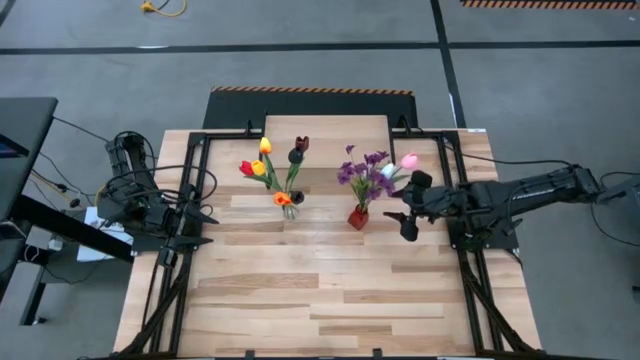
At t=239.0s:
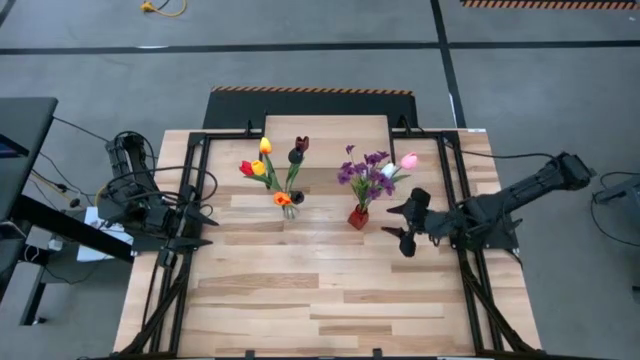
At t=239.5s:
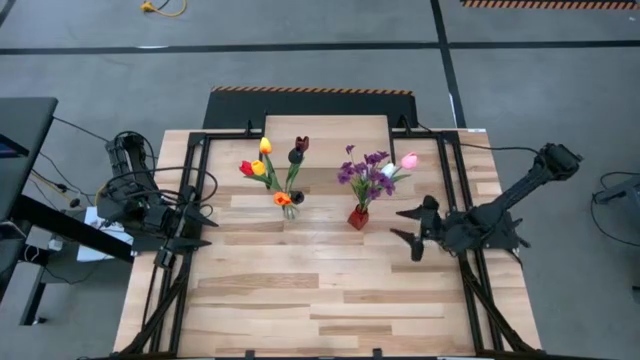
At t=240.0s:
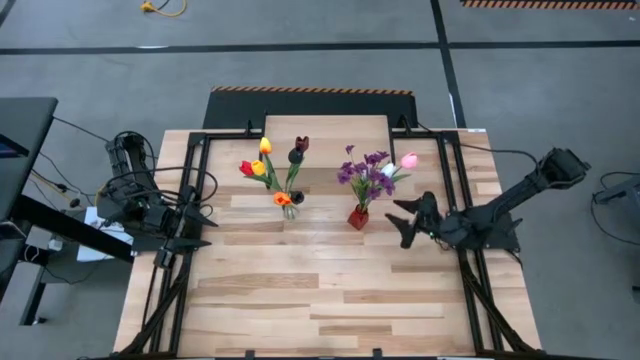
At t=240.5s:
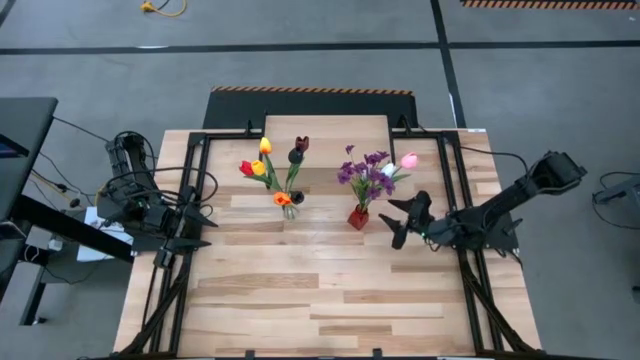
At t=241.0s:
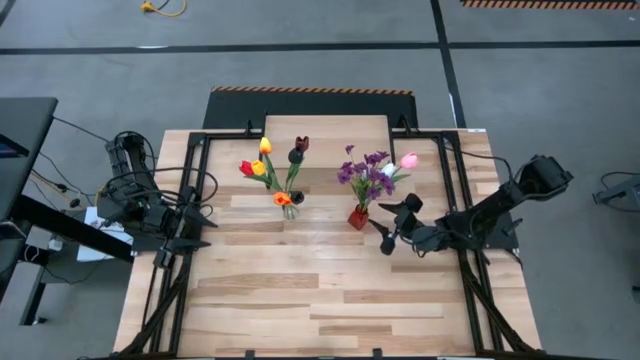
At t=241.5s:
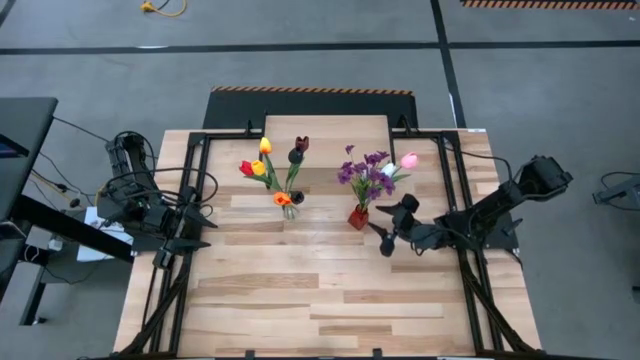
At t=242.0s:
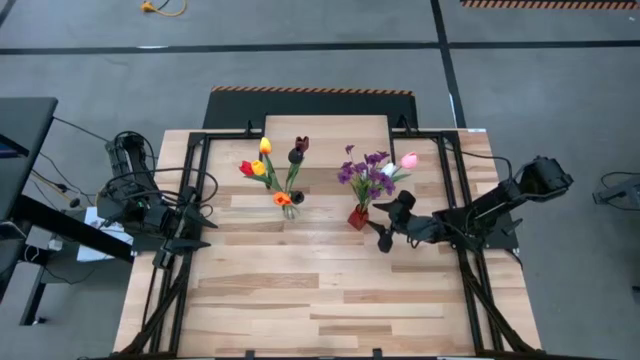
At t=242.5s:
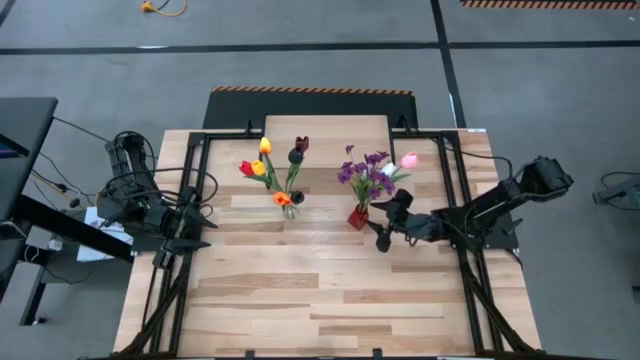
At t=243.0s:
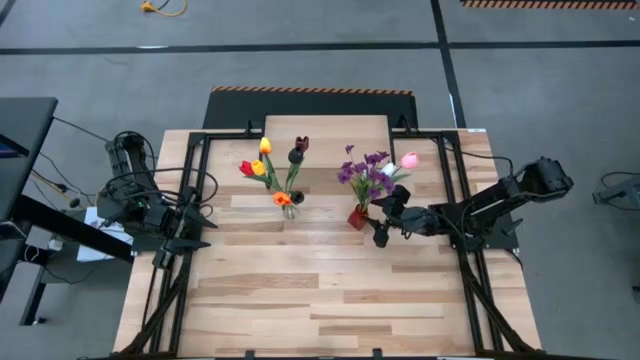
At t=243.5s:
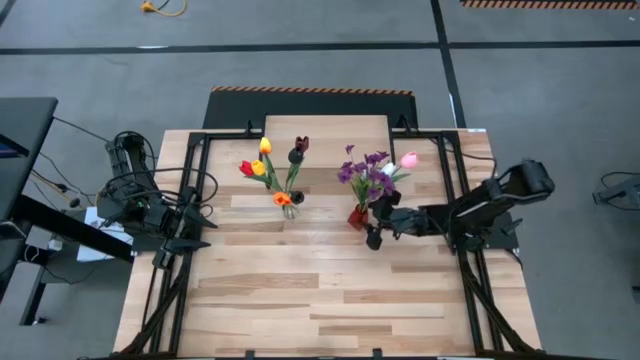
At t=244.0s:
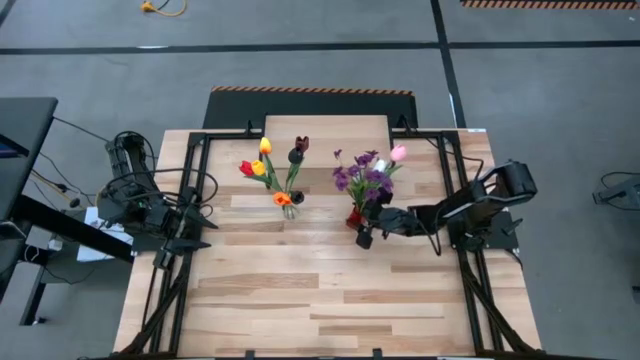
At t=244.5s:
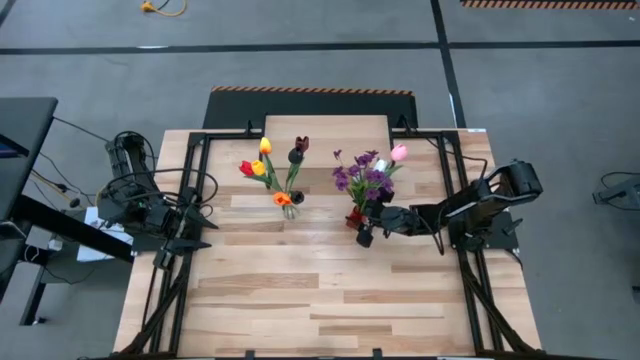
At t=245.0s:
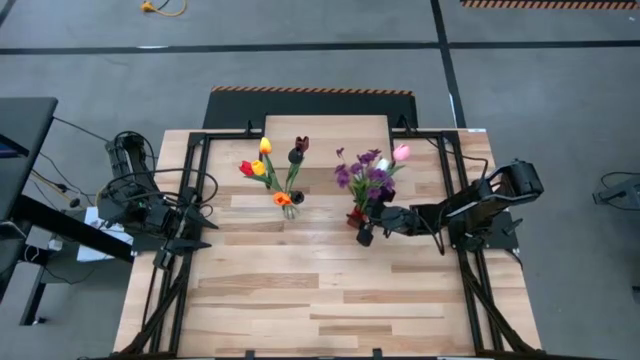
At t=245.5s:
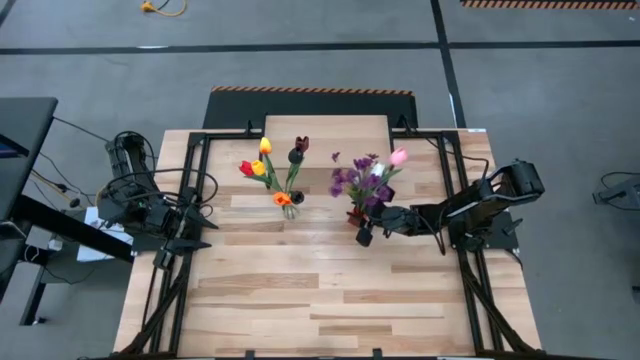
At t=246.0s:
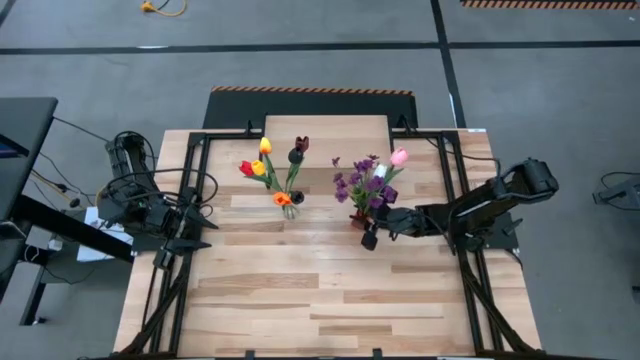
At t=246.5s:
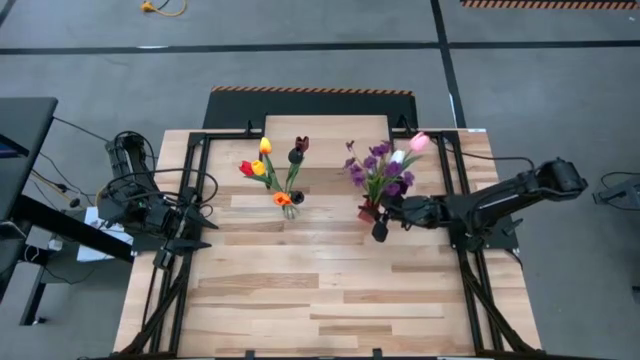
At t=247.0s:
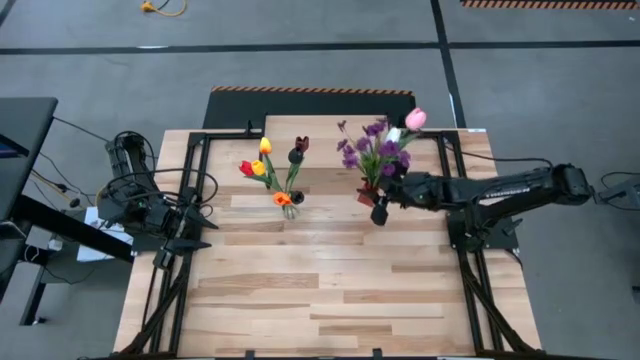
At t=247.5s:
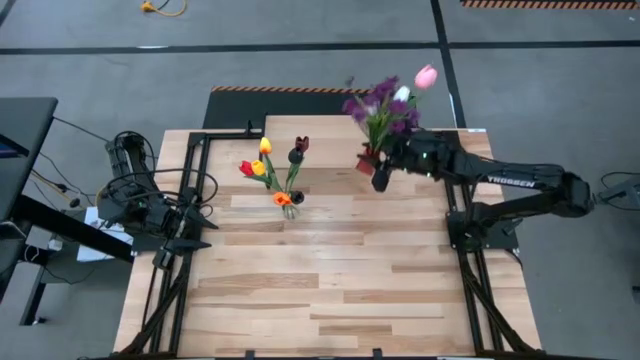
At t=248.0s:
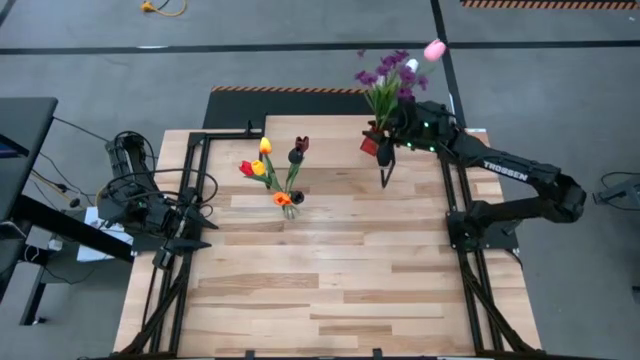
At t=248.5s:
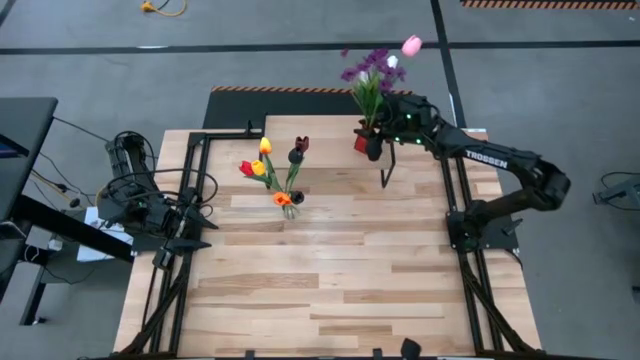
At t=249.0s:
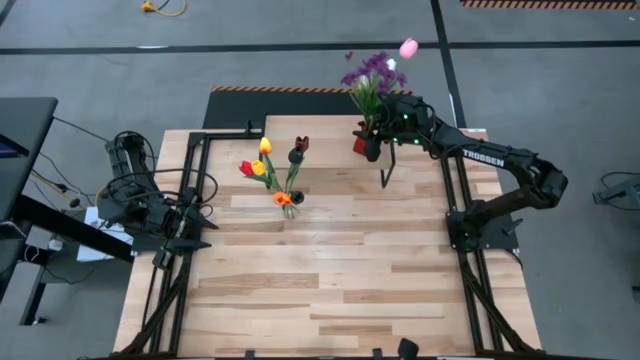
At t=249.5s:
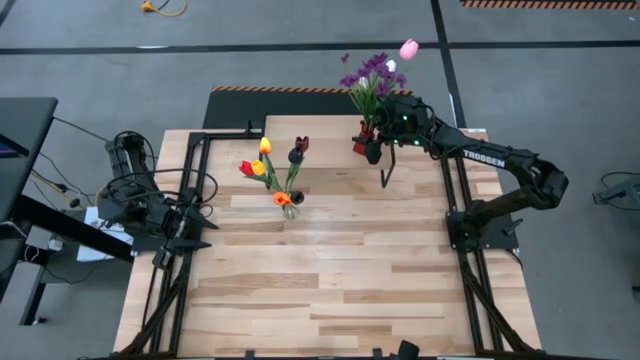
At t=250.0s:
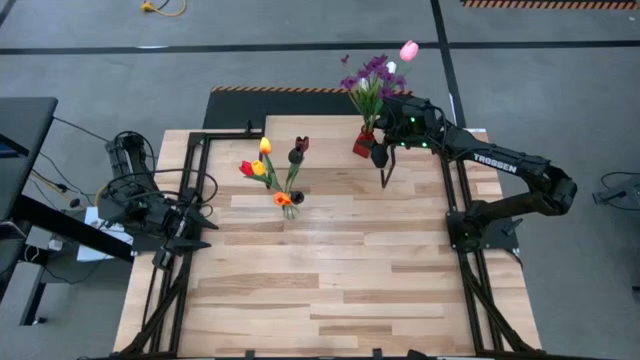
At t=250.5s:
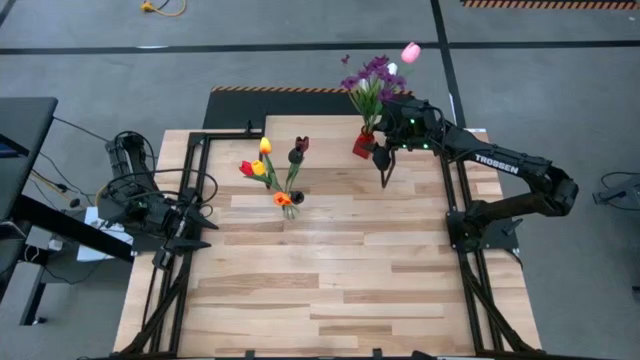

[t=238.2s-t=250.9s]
Task: Pick and place flowers into a vace then onto a shelf
Put the red flower vase with the flowers on the shelf

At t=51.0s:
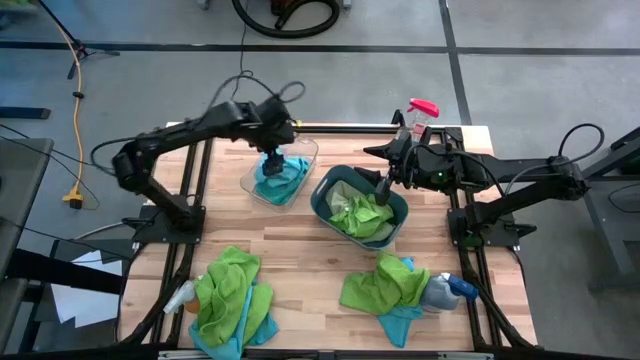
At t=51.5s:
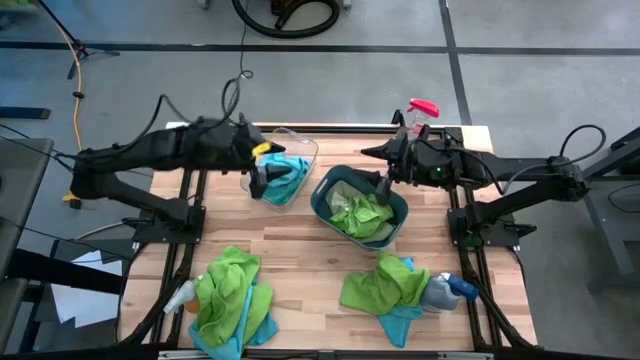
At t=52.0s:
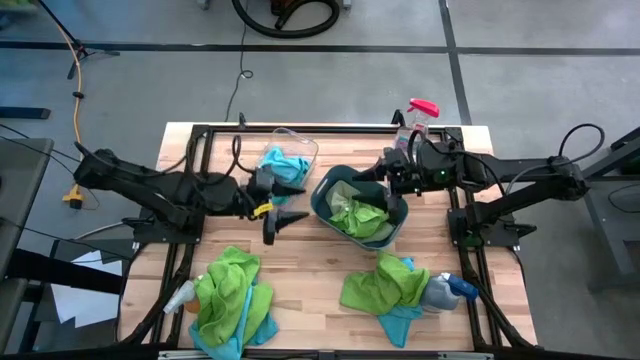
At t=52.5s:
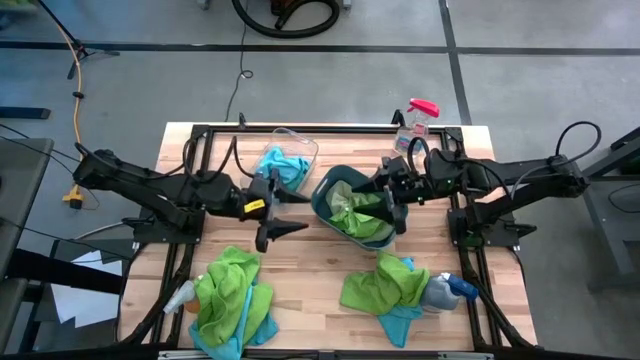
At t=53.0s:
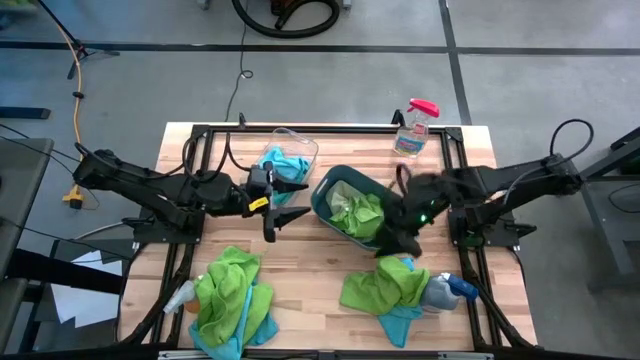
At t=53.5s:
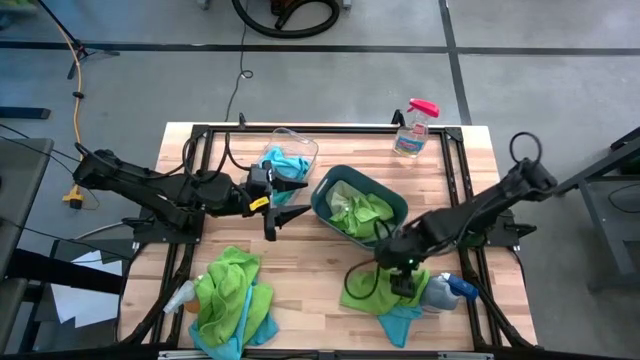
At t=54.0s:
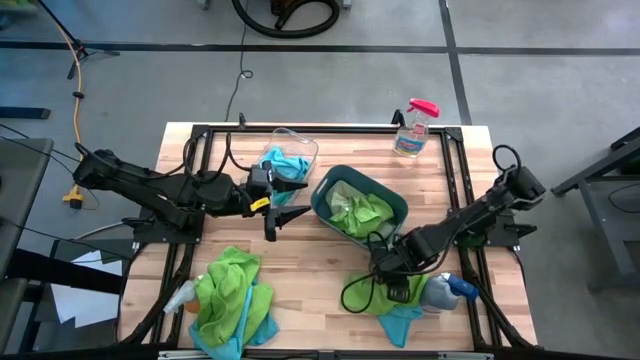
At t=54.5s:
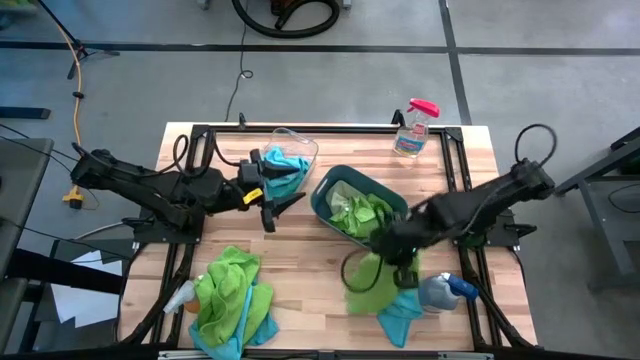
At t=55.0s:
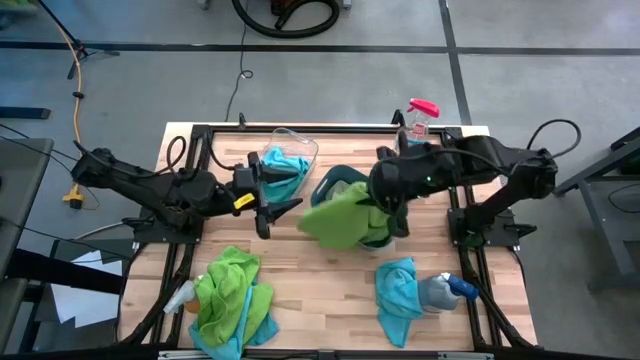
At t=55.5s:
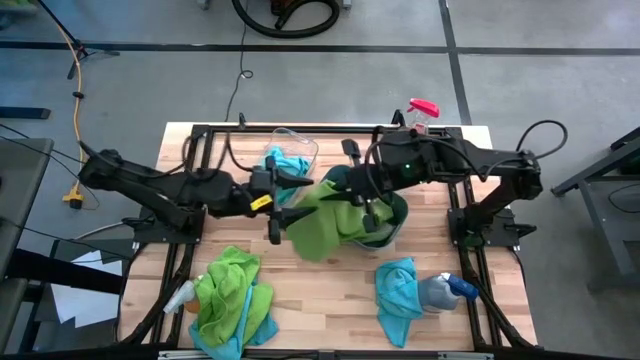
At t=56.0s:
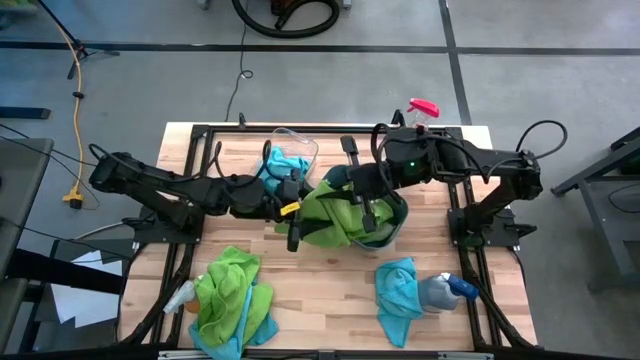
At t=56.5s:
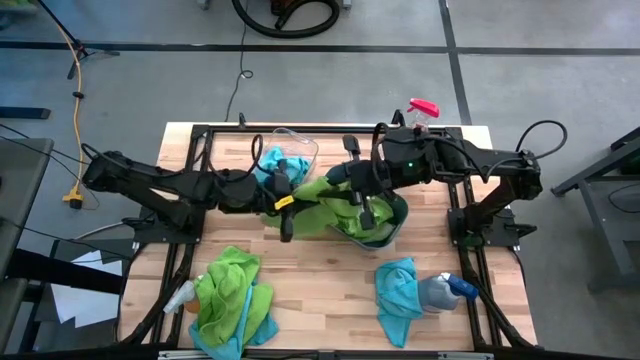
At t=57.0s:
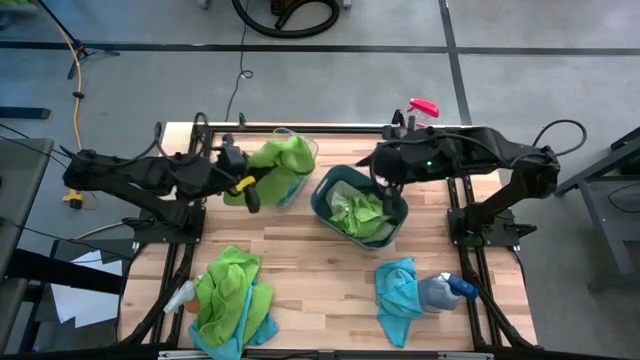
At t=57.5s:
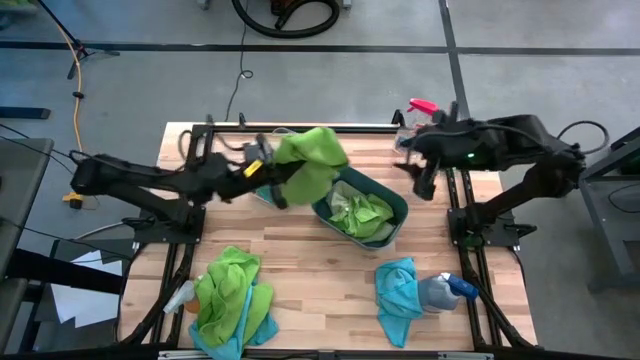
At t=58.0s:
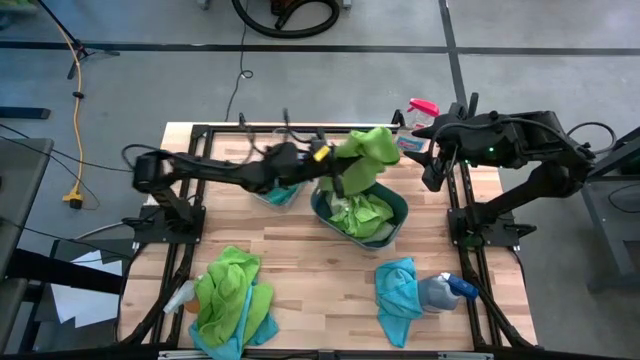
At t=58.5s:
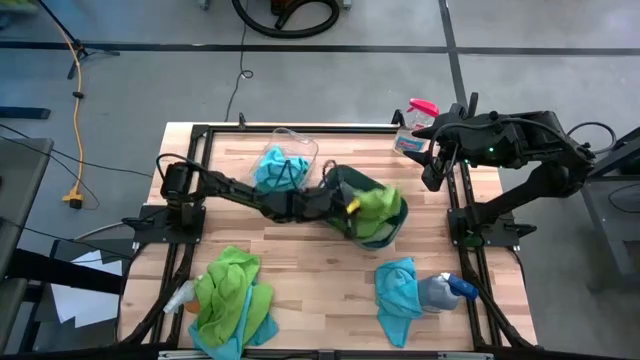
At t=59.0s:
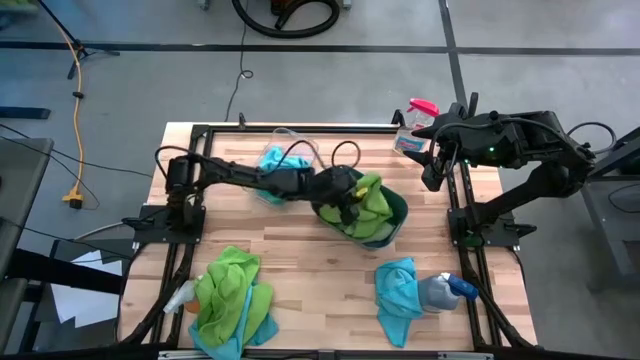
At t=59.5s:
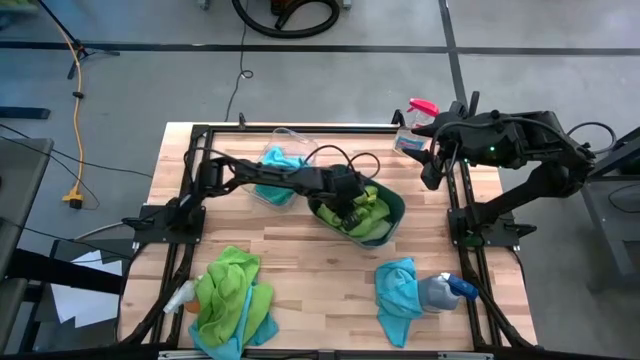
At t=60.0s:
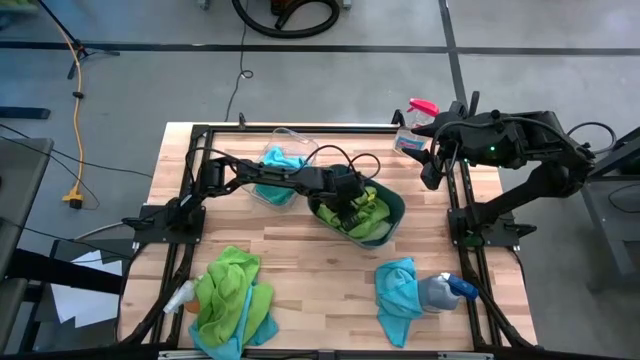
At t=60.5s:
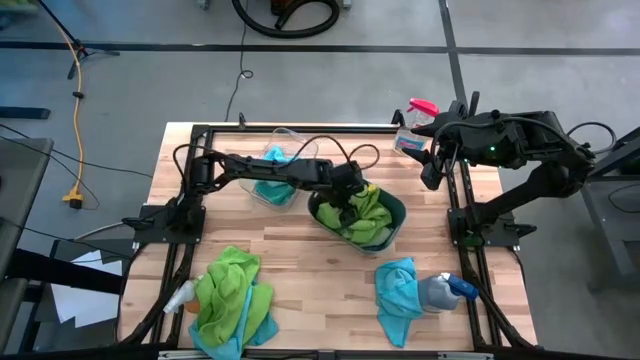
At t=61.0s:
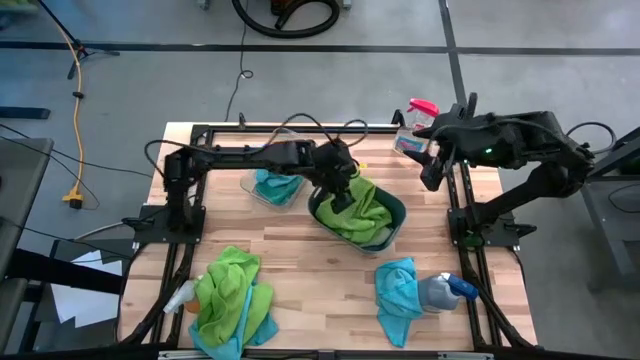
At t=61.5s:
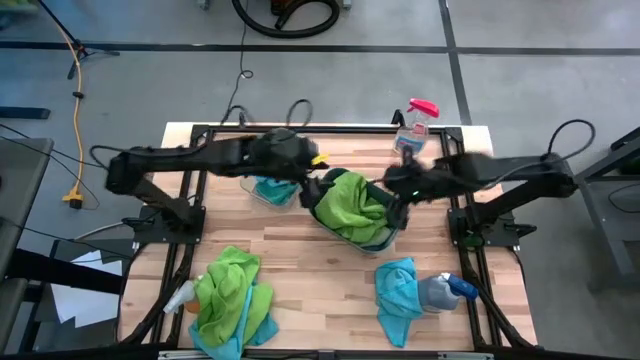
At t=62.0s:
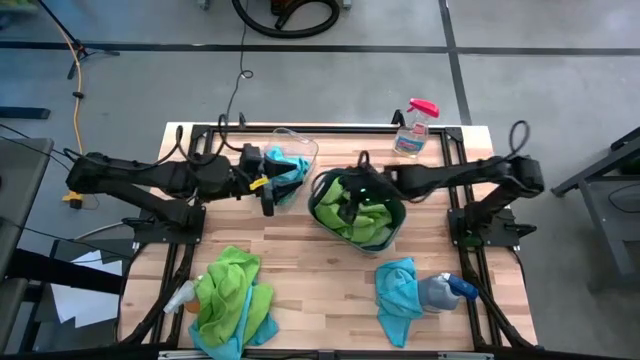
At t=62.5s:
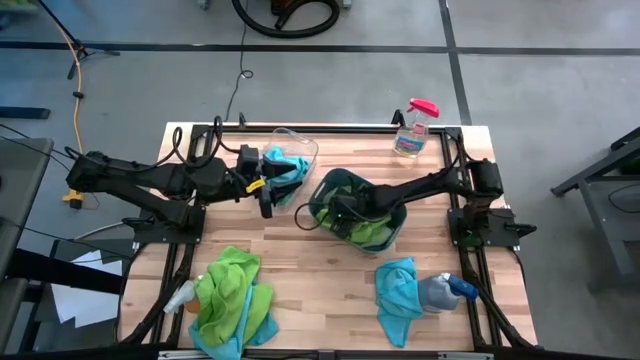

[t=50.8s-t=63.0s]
Task: Sort microfiber towel by color & place in baskets
Put the green microfiber towel into the blue bin
